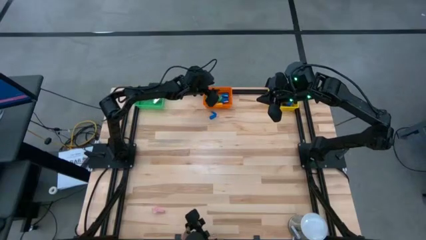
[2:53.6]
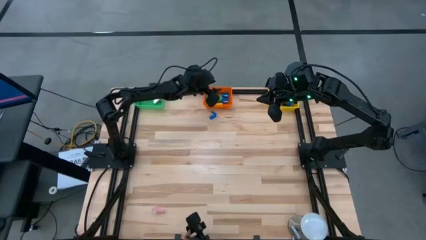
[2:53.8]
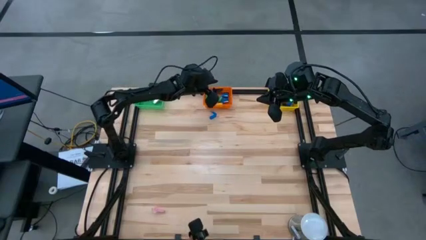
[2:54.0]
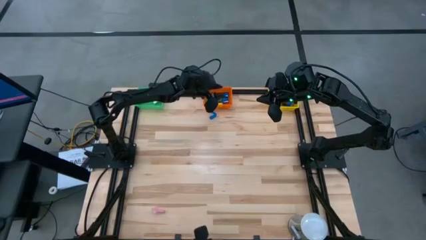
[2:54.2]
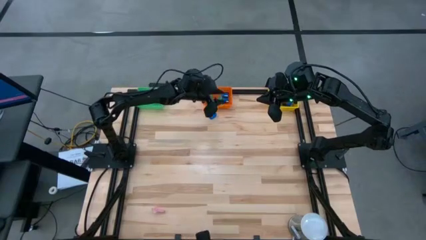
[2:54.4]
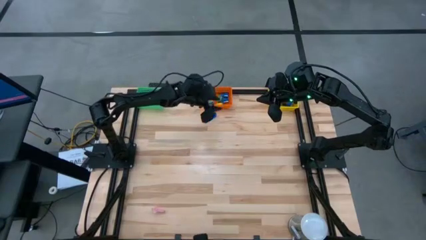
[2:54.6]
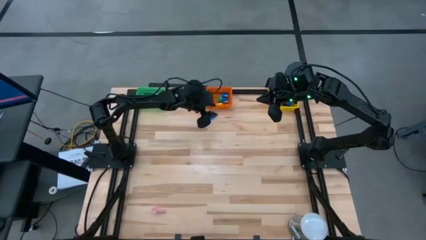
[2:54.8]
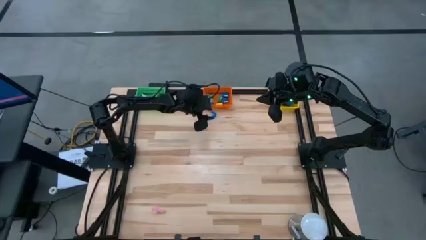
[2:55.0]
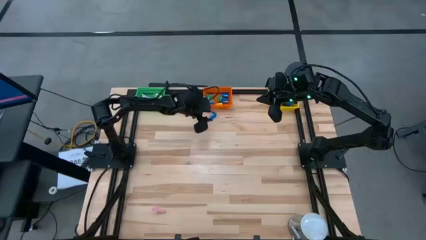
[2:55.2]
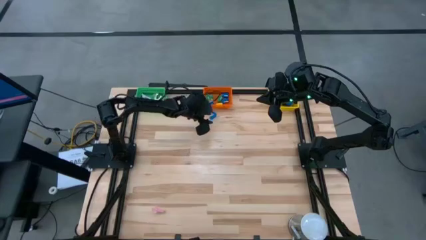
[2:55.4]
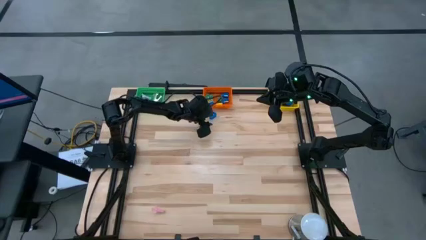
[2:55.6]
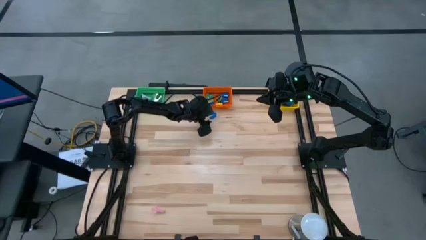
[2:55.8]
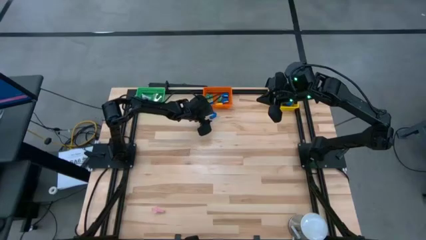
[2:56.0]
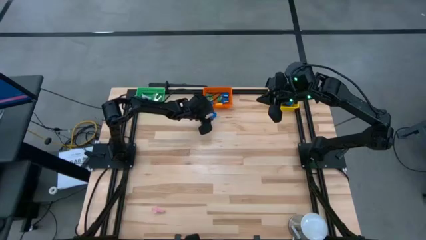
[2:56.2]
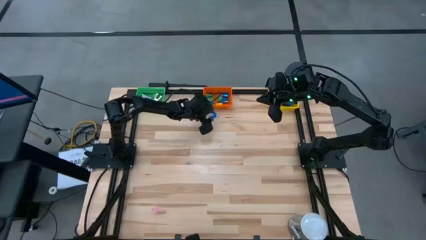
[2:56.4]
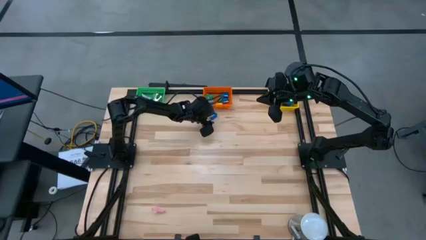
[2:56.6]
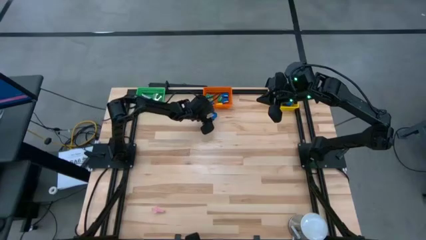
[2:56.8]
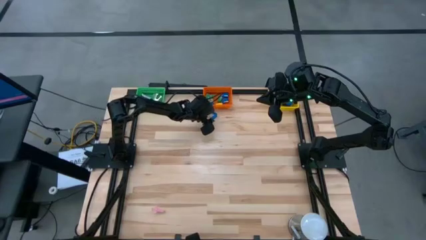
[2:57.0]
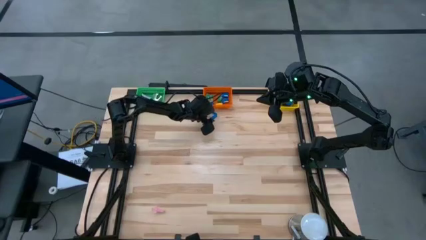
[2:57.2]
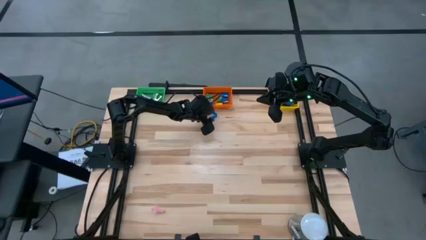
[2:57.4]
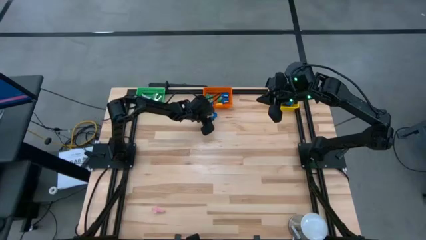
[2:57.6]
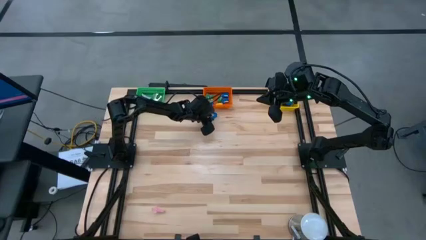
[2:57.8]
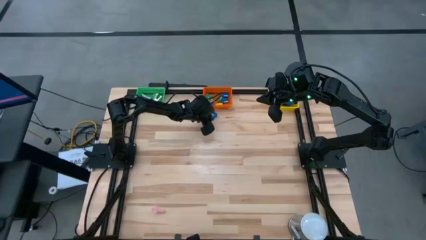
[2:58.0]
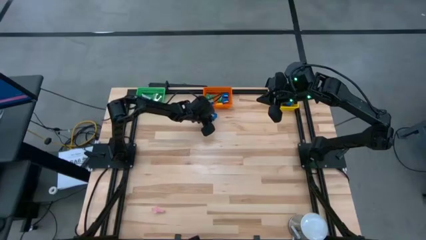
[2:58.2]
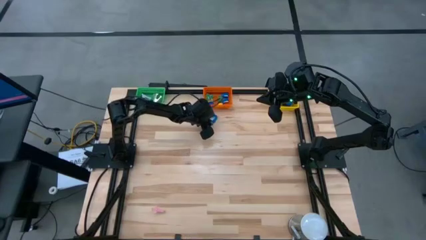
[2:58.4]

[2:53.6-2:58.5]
Task: Pick and place Stapler, Stapler remover, tape
Put the blue stapler into the orange bin

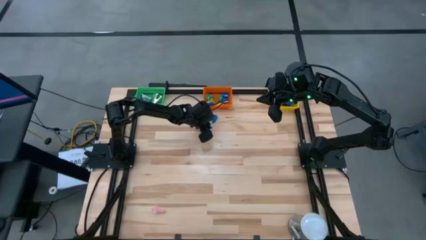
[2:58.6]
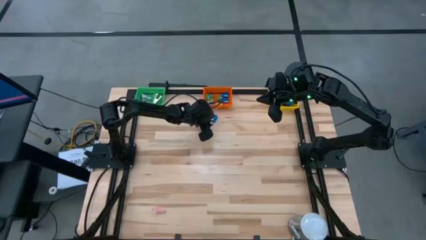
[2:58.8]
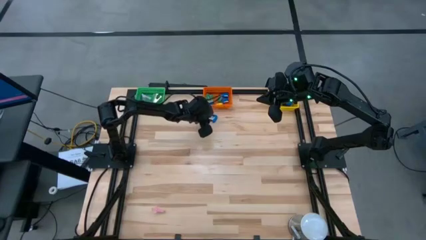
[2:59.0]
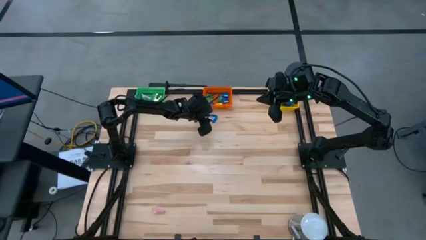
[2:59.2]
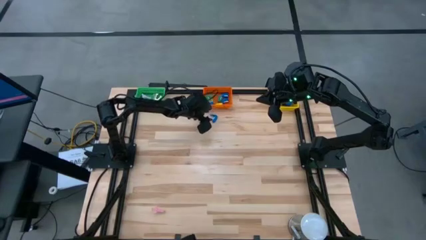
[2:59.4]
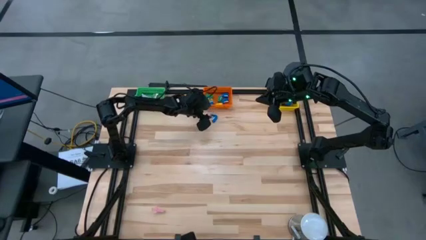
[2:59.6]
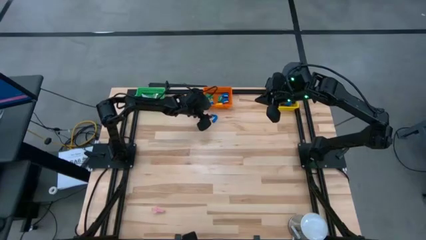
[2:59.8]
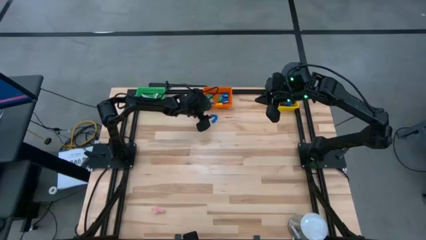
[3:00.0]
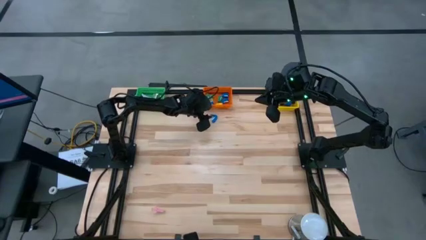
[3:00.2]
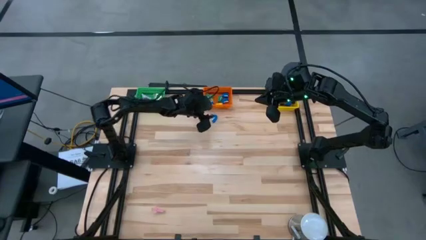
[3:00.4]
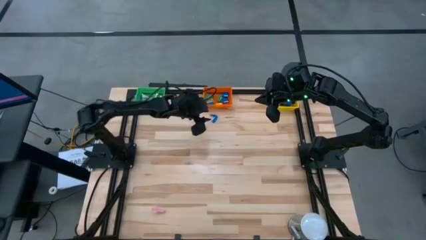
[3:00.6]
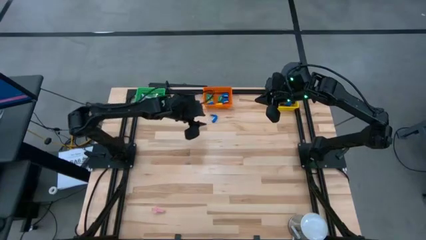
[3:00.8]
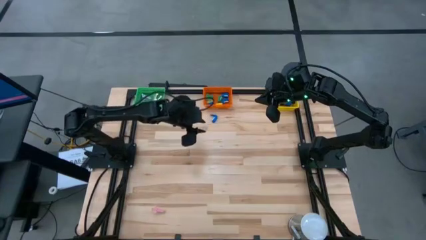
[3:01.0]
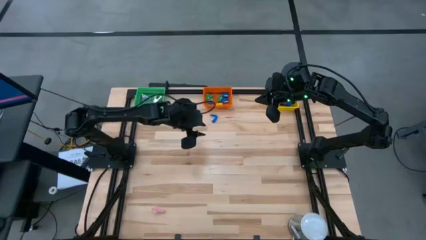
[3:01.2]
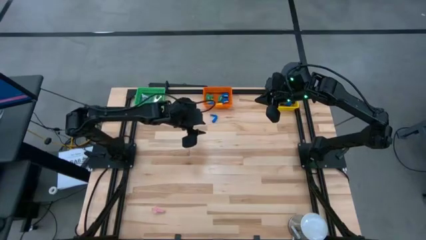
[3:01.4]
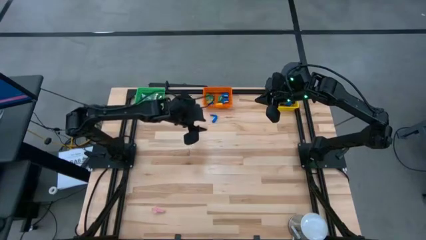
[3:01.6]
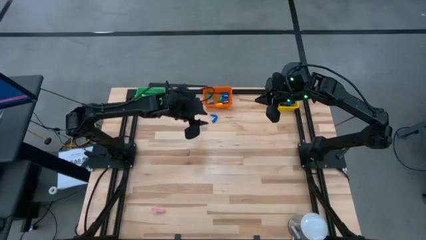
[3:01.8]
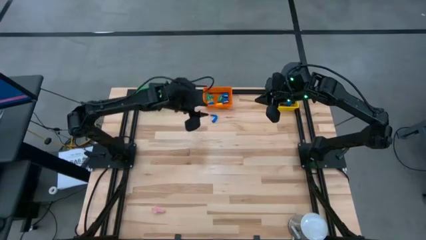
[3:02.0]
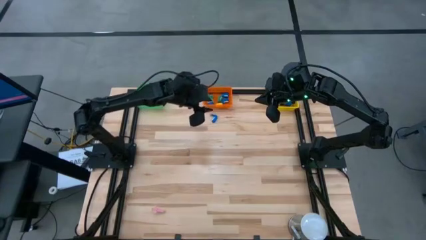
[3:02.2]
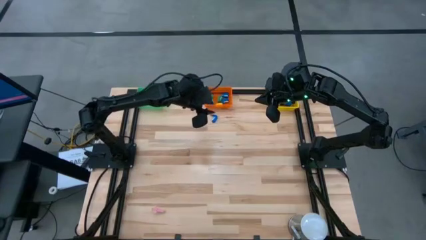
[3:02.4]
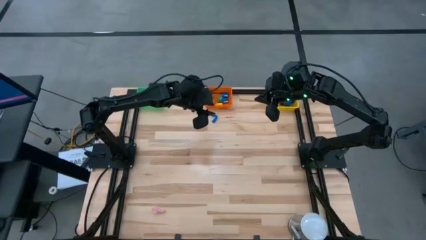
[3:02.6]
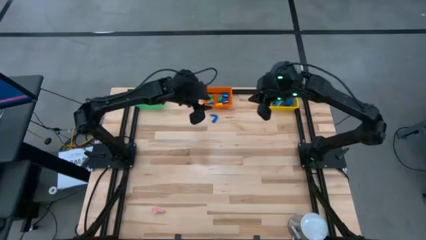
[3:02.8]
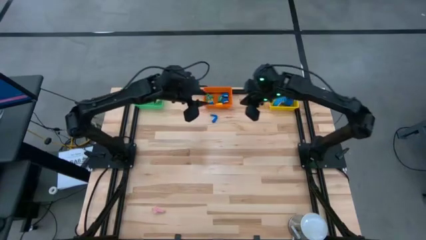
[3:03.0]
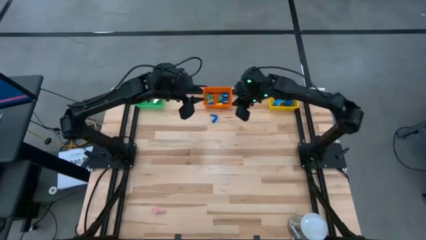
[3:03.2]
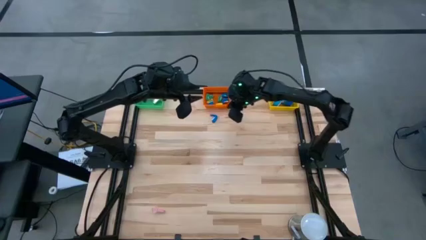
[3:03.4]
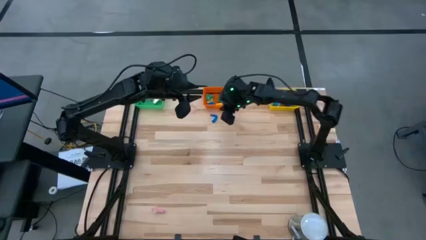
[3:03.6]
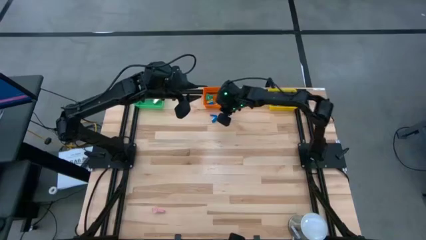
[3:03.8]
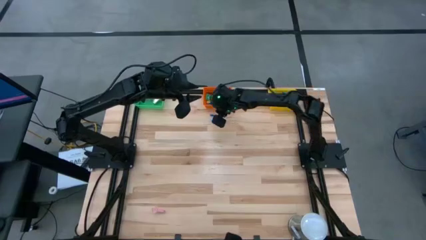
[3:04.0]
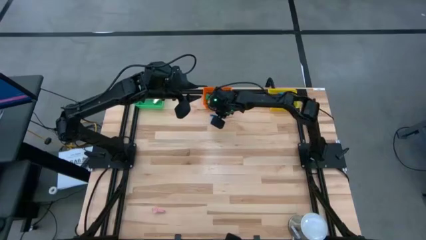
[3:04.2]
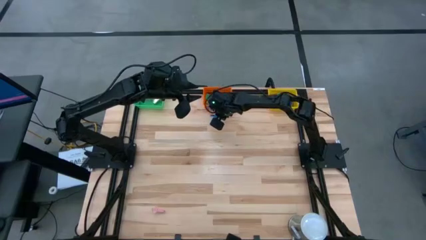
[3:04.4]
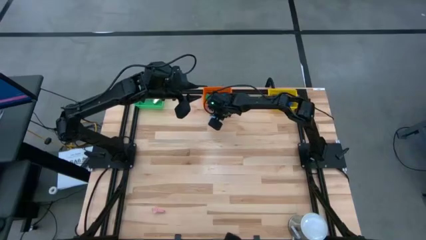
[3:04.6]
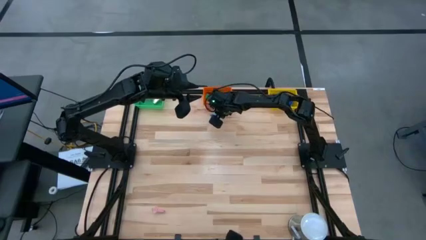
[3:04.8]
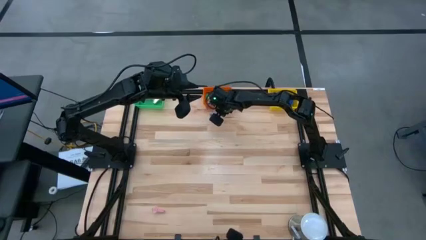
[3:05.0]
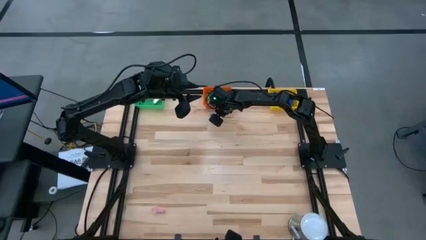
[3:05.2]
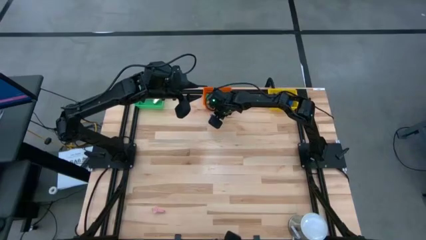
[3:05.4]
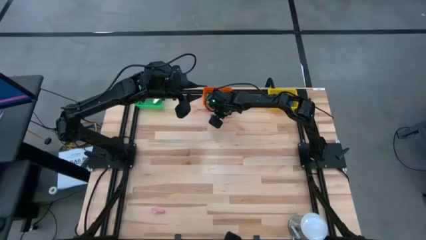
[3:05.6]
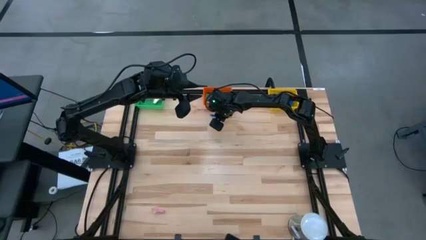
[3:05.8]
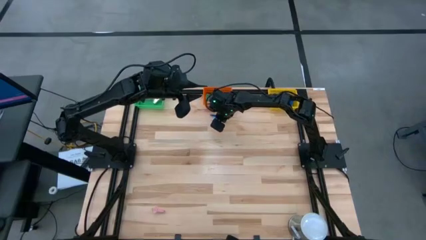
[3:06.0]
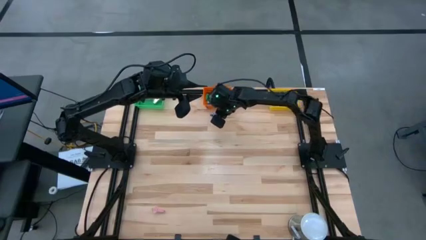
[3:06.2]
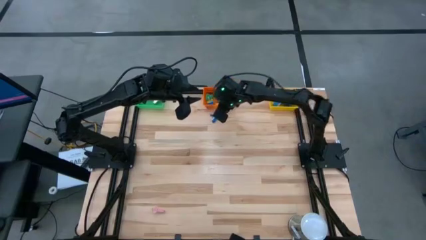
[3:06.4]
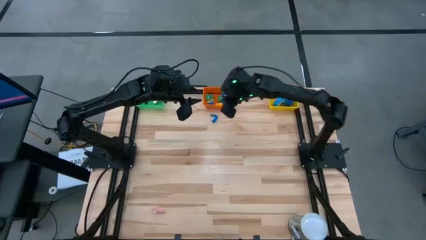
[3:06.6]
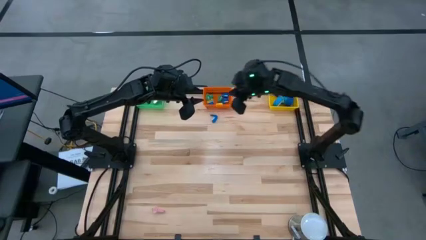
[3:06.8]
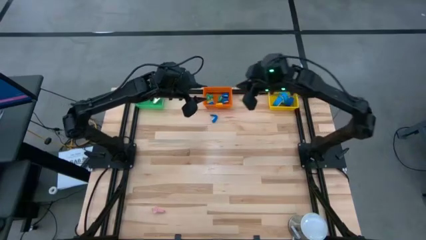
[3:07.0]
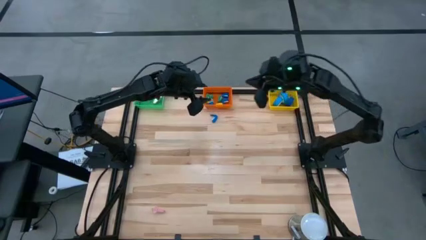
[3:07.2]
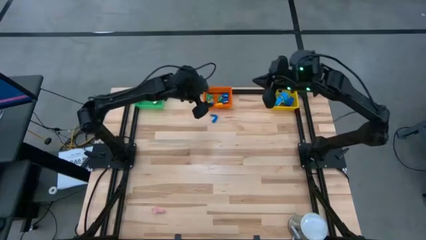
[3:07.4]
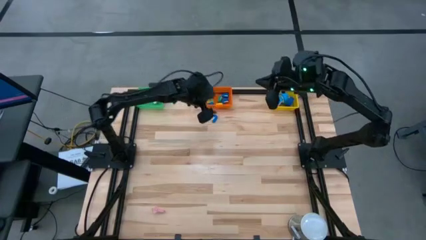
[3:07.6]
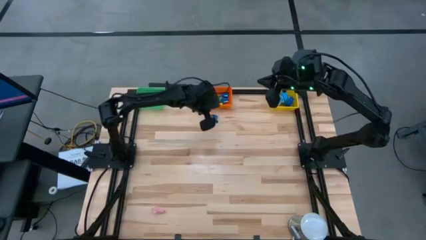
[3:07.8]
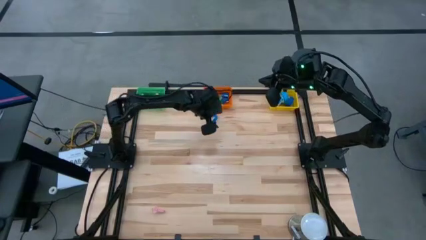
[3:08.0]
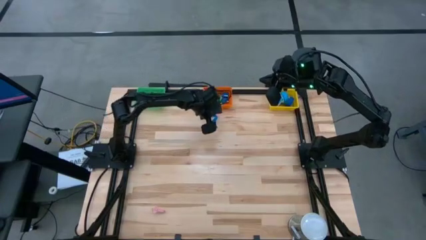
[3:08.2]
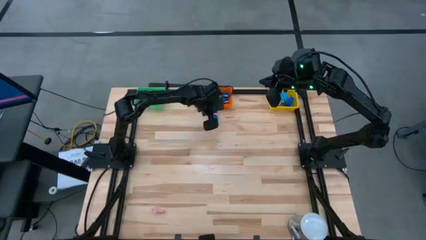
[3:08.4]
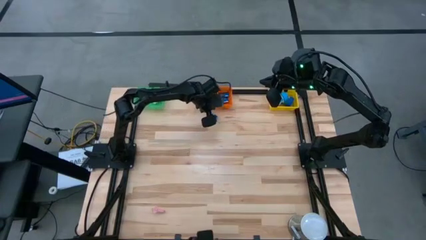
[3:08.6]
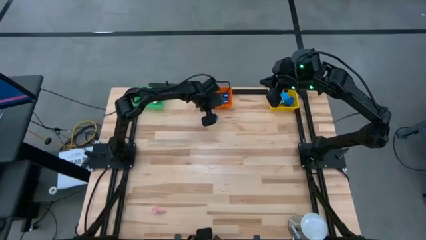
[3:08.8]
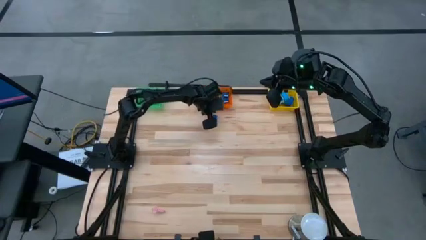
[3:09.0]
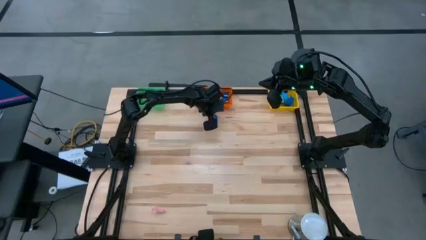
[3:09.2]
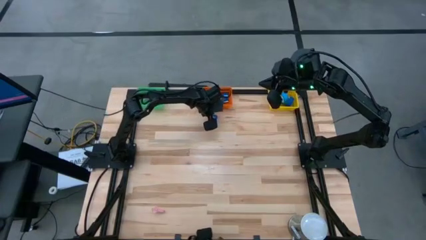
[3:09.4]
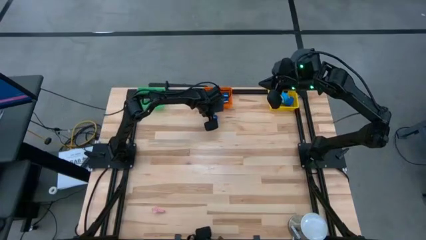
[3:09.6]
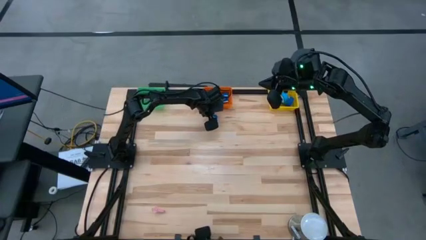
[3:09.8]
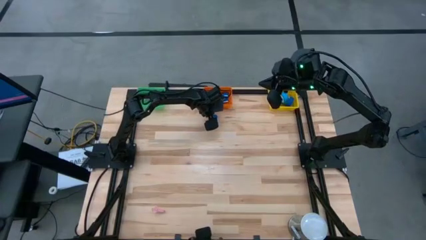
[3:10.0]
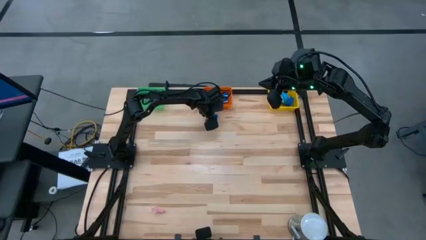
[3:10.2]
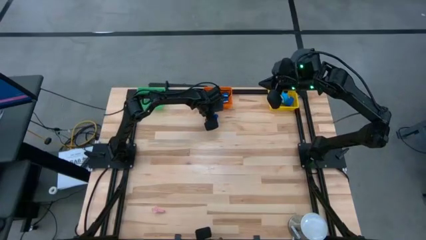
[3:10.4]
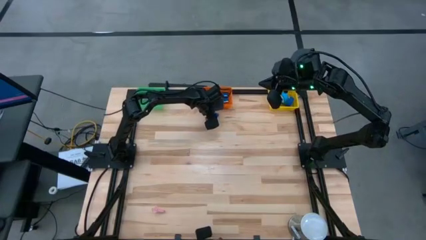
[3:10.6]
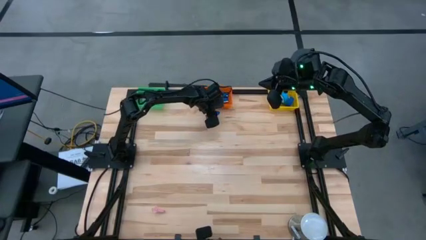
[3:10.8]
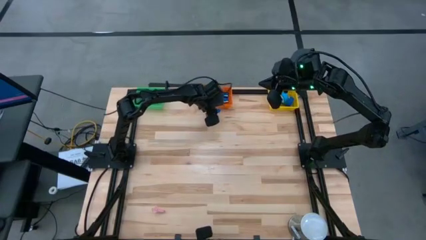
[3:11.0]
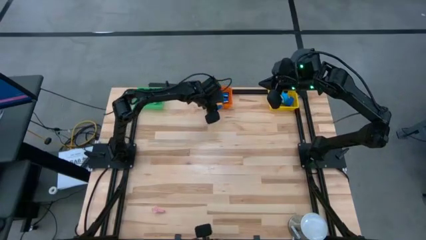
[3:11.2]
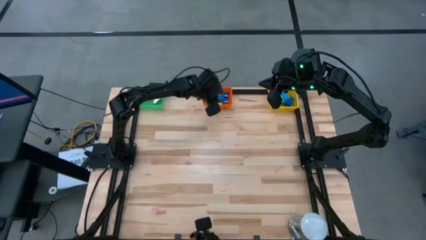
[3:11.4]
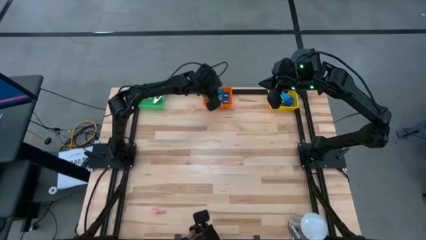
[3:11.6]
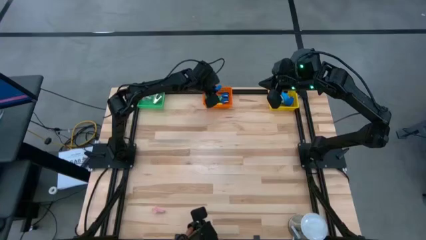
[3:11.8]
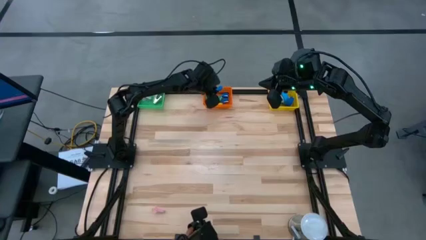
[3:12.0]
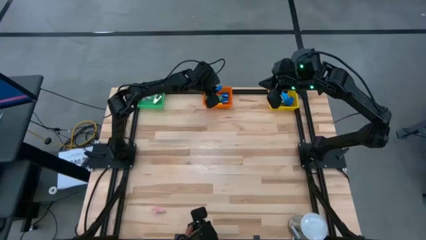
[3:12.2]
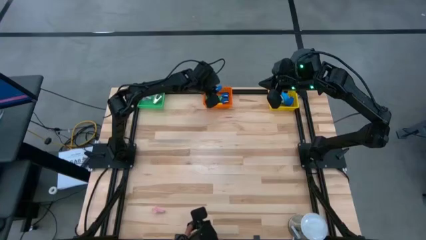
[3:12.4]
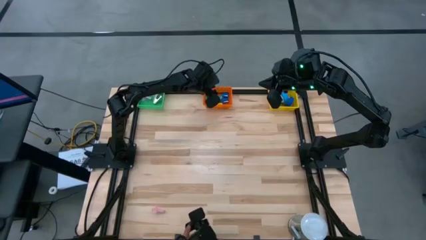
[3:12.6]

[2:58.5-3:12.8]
Put the blue stapler into the orange bin
